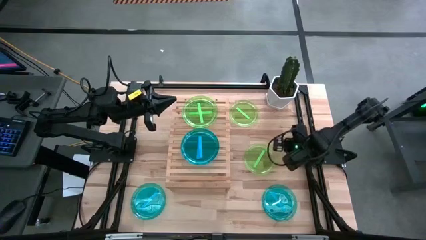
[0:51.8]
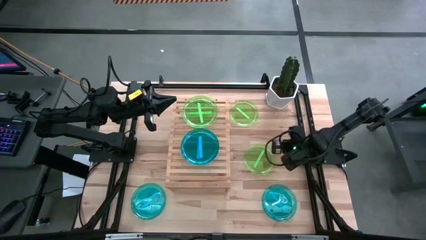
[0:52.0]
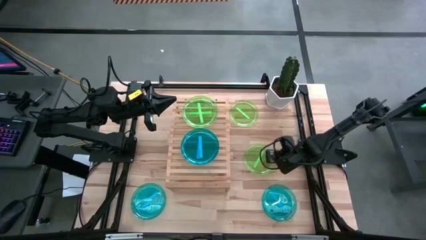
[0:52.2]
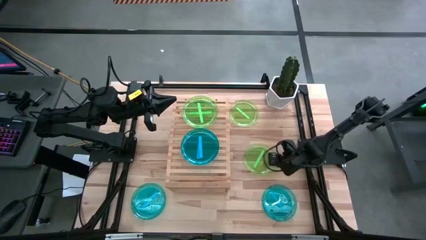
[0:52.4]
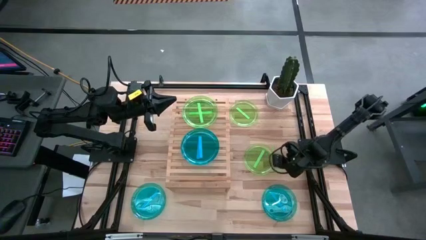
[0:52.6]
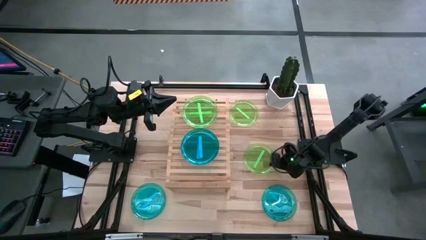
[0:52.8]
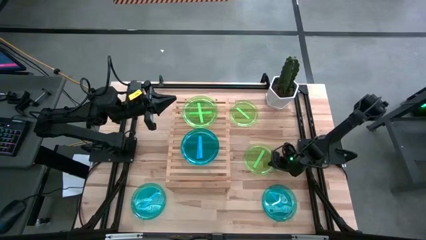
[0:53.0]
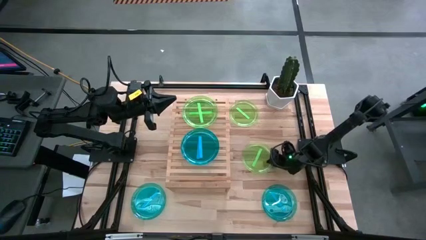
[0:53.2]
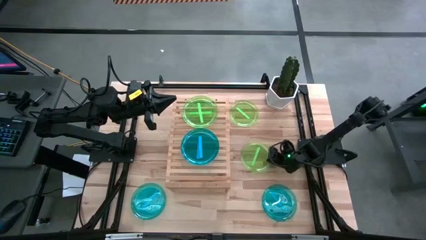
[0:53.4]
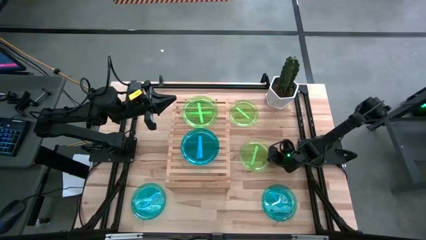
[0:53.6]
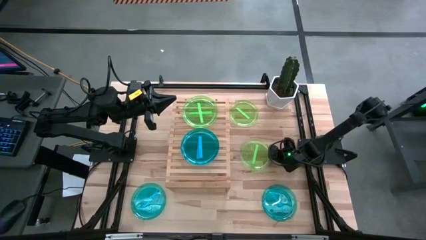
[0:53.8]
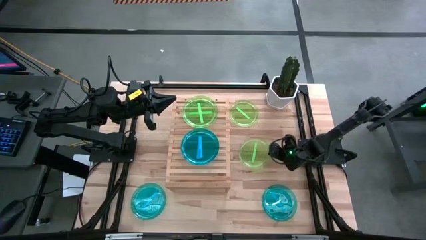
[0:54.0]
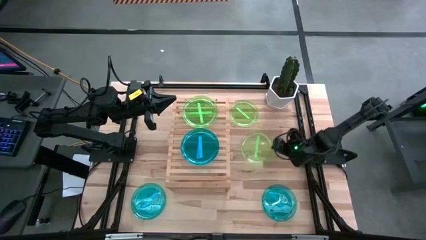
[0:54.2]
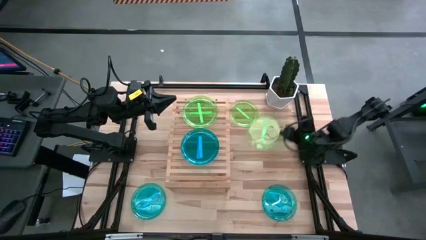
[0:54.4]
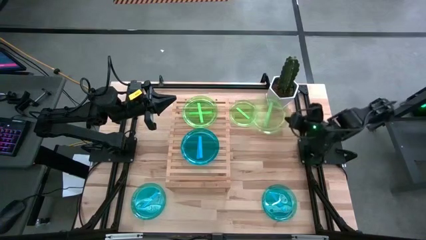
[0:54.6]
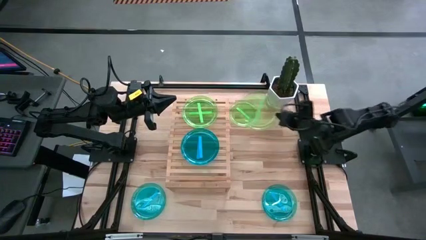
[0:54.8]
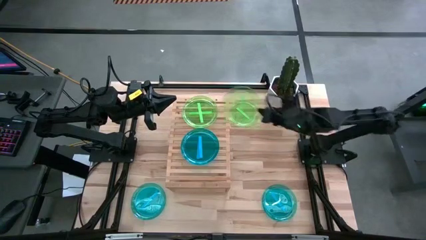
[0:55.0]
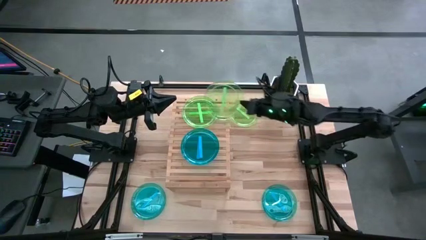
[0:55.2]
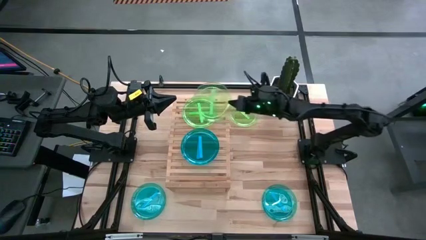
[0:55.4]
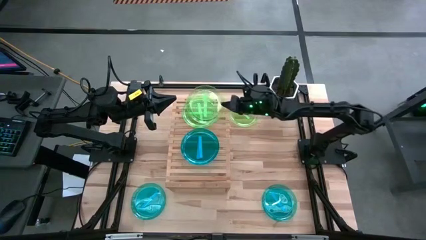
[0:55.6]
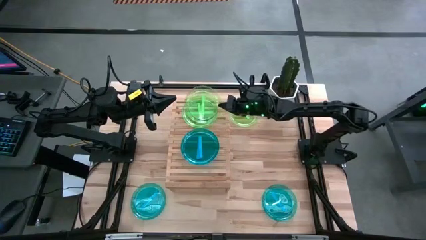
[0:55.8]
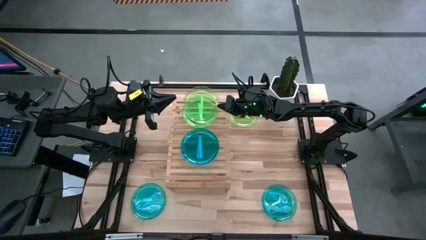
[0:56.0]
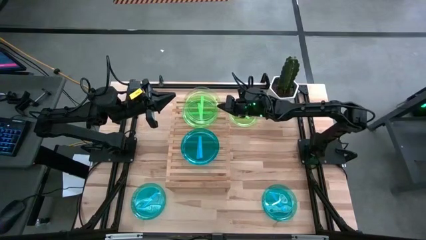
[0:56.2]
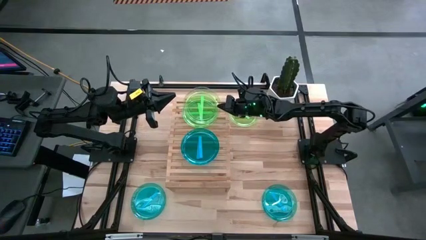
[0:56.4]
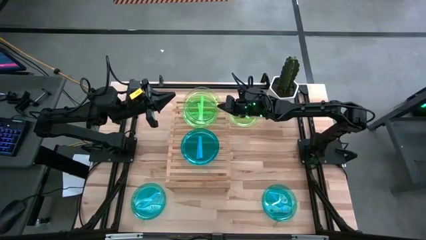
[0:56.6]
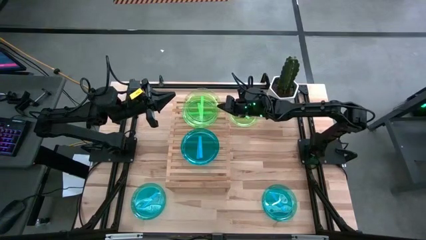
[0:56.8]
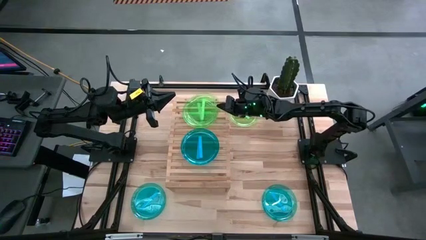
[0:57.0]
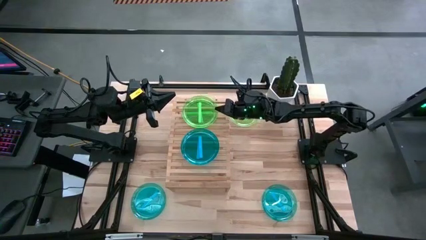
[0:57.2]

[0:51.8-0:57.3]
Task: Place and stack plates onto a shelf
Stack the bottom green plate on top of the green plate on the shelf

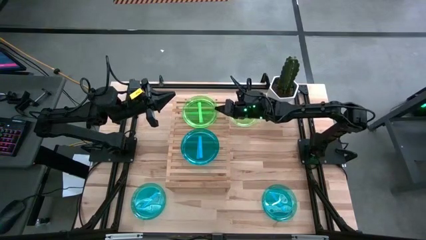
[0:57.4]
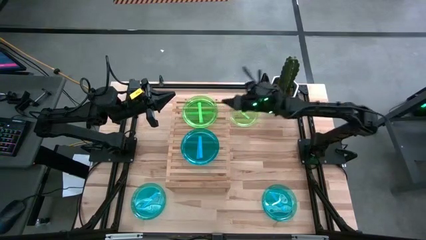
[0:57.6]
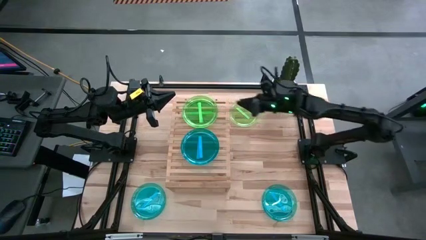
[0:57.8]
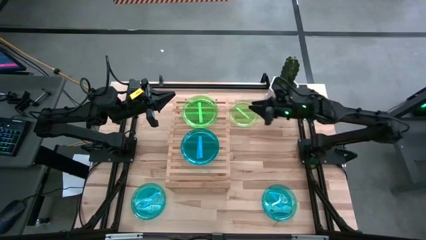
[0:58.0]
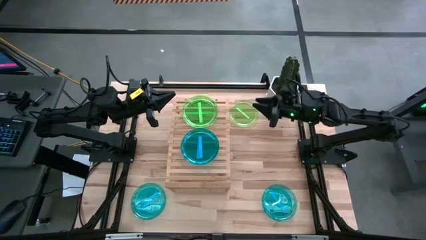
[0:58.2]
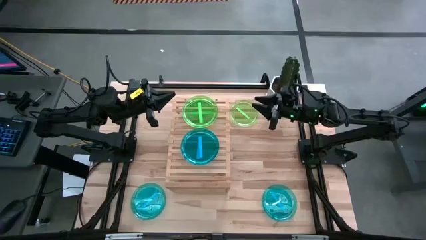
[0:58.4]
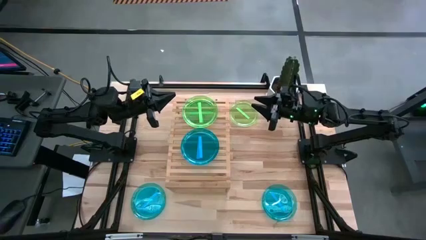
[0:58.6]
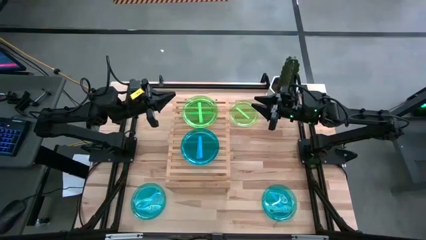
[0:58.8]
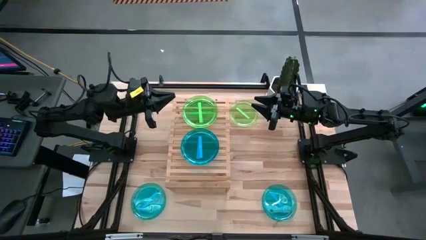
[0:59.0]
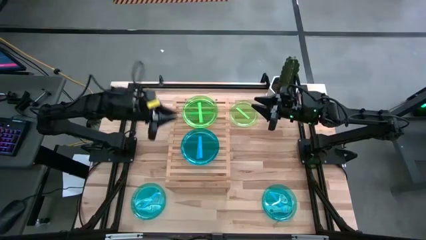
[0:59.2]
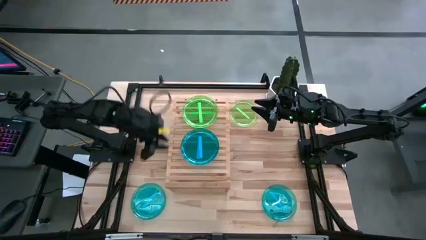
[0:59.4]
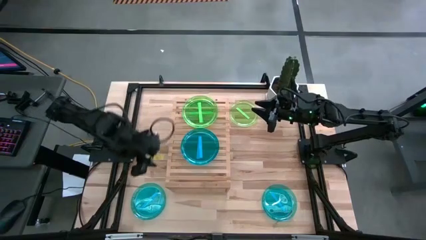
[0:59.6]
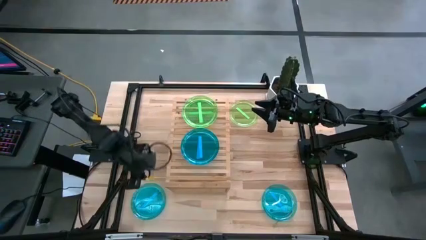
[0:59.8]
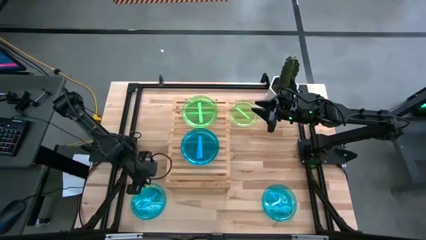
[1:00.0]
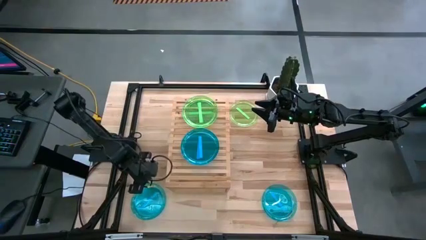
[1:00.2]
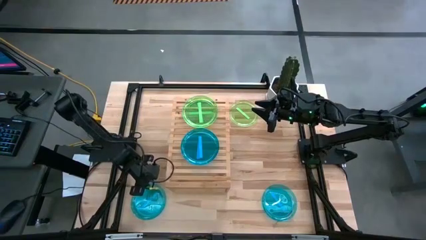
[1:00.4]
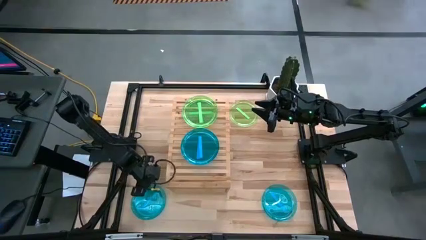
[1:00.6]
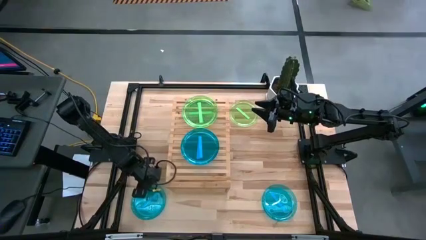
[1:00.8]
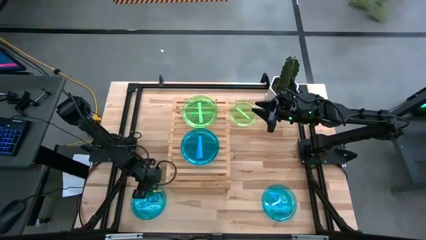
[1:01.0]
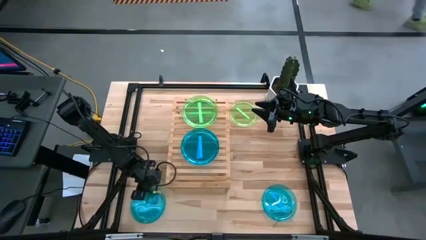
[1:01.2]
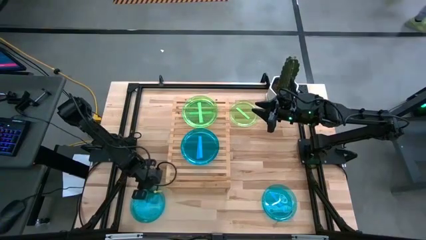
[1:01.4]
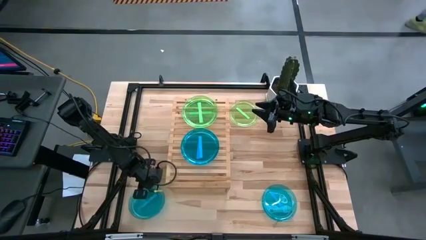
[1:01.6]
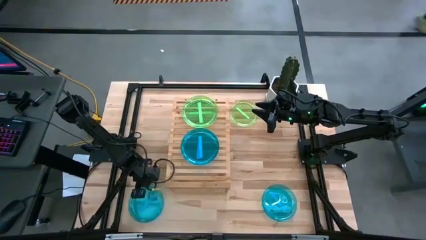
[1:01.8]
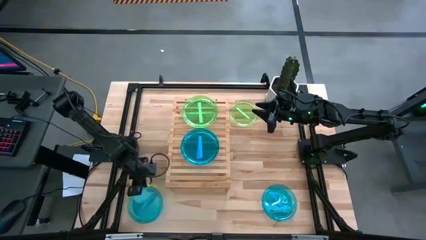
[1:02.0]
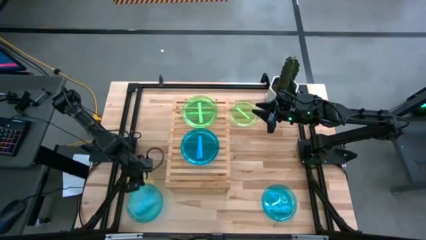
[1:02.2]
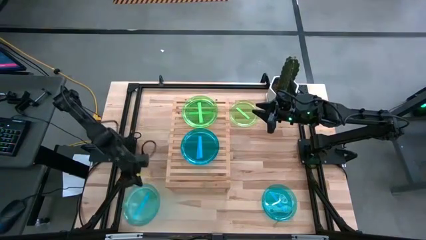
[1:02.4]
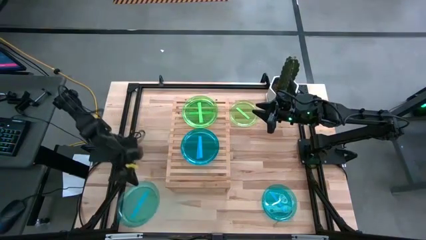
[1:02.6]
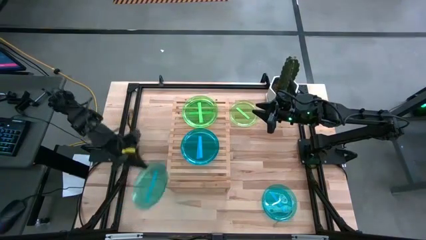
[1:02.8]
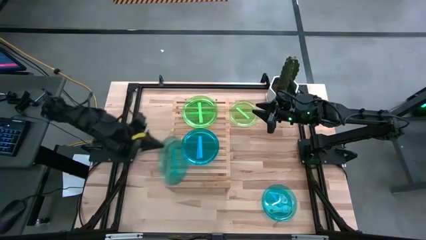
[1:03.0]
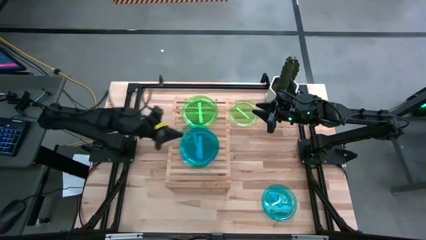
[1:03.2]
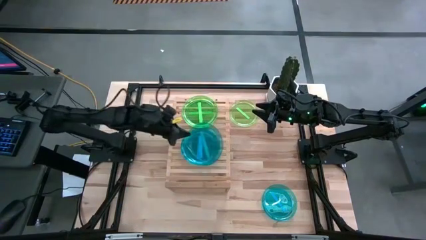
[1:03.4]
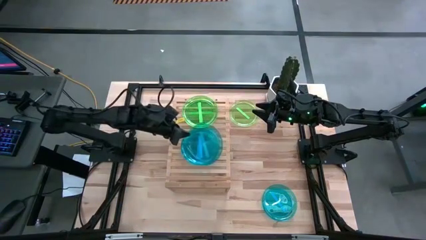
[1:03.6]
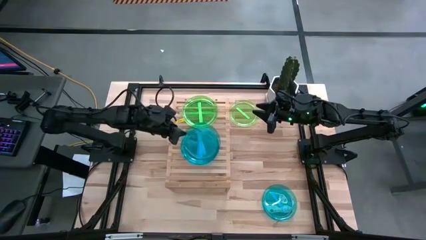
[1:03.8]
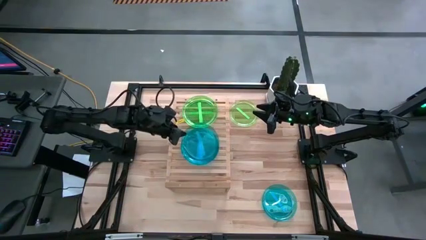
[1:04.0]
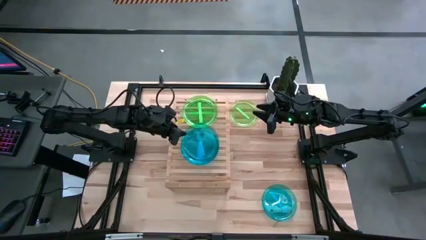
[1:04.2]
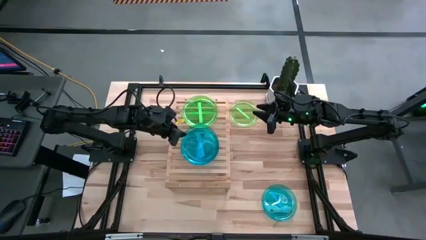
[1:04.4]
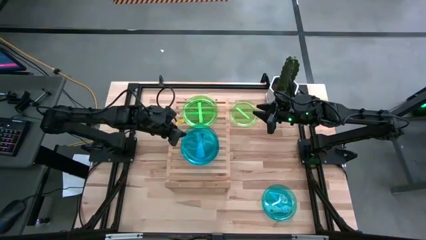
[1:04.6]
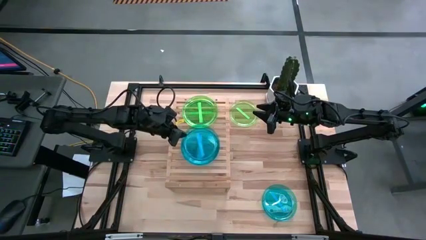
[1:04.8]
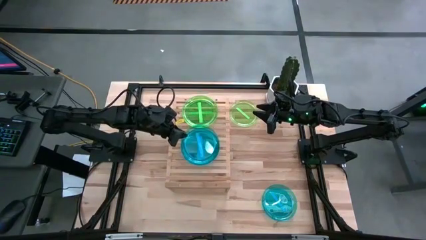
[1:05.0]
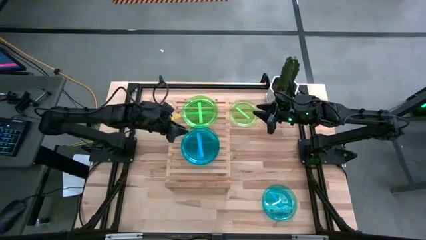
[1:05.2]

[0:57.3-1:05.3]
Stack the left blue plate on top of the blue plate on the shelf

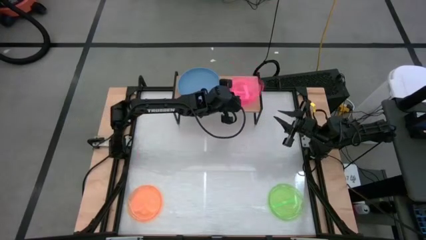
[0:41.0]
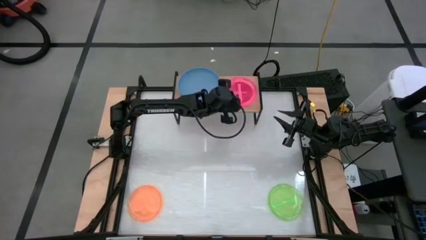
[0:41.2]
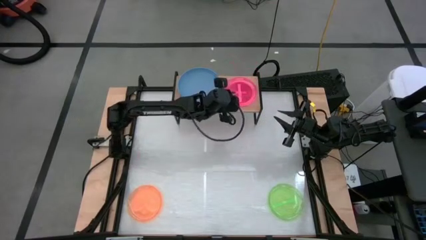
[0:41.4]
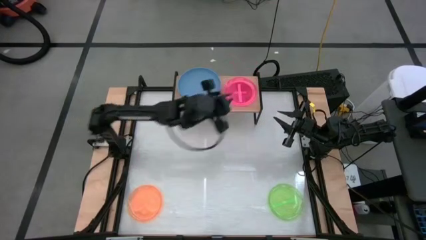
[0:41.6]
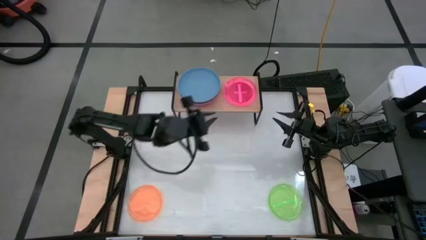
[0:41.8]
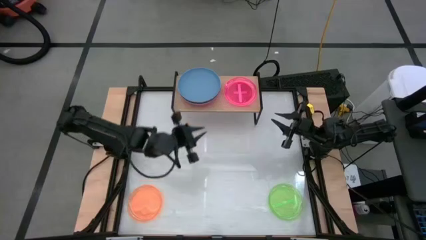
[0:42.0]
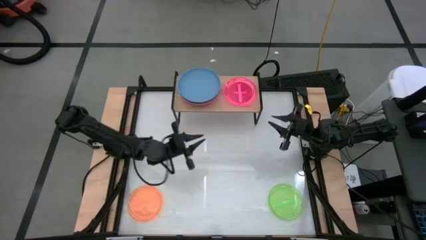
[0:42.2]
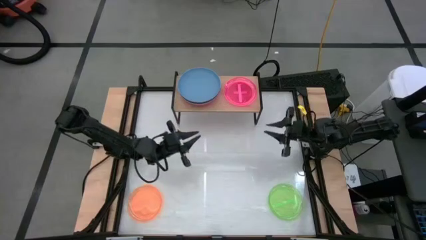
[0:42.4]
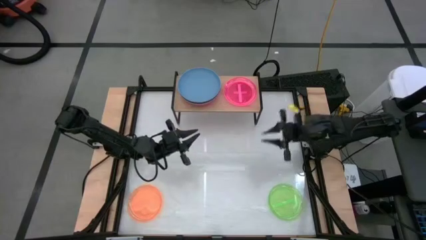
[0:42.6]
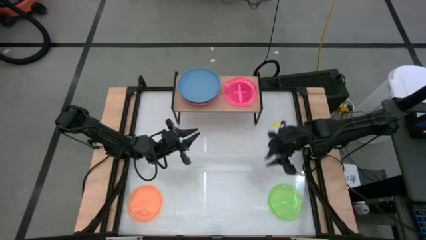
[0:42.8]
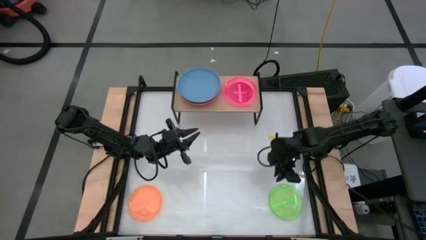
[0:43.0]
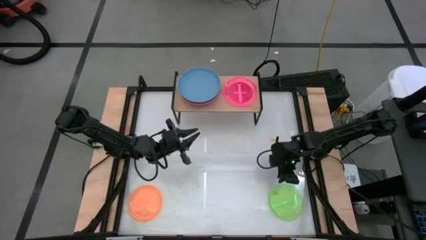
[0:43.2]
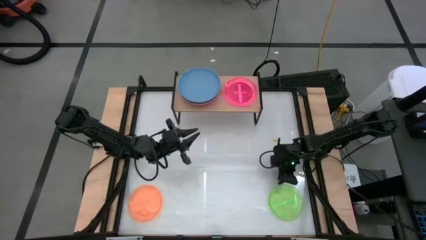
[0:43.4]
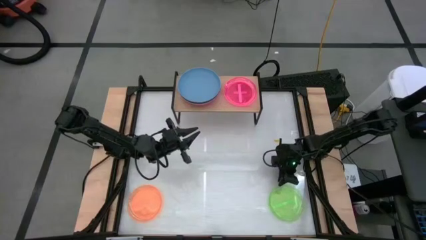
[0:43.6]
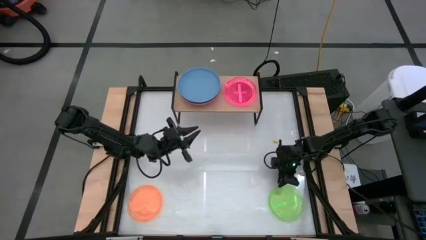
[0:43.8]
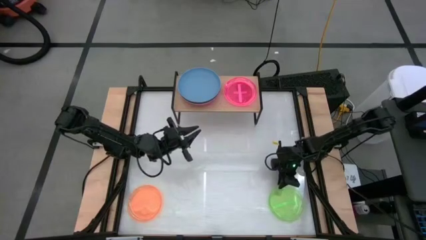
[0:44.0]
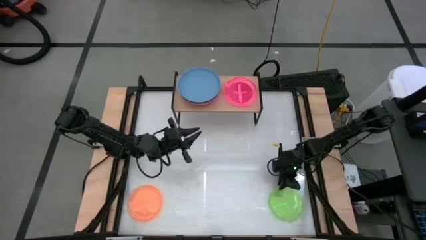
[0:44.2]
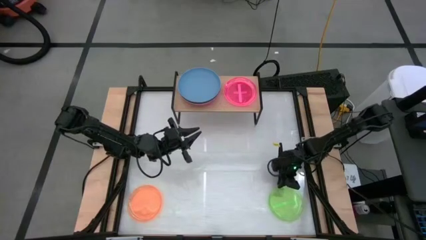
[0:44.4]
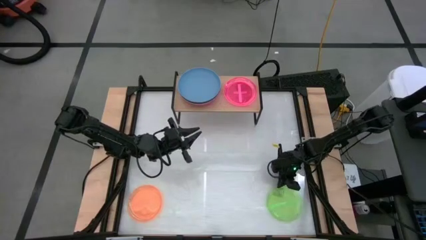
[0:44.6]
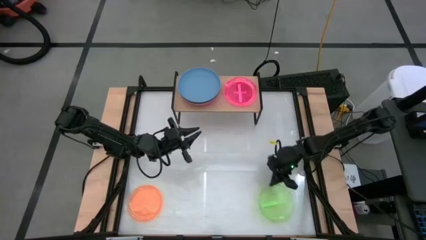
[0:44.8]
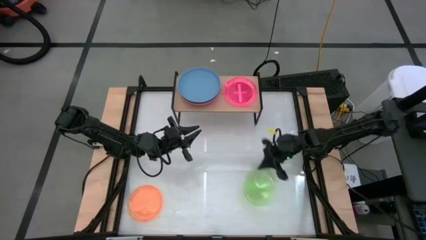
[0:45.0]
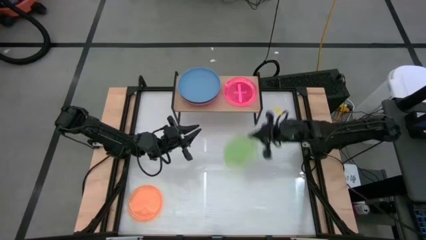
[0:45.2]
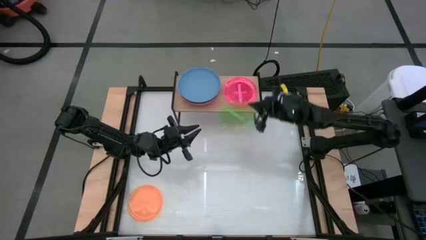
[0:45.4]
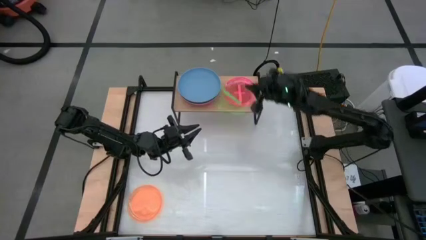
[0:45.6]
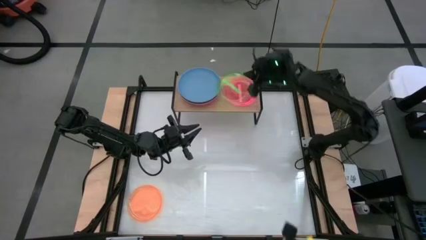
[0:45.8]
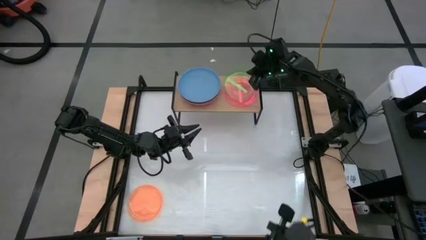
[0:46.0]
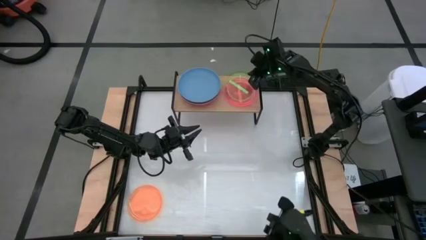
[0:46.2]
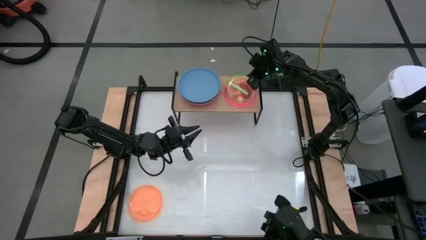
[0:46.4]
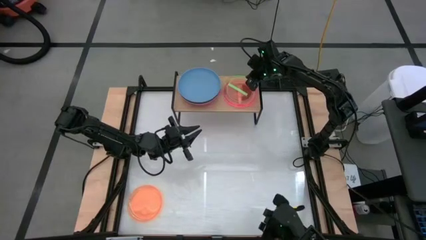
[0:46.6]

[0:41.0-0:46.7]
Task: Place and stack plates onto a shelf
Stack the green plate on the pink plate on the shelf
